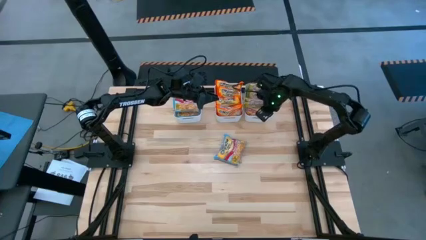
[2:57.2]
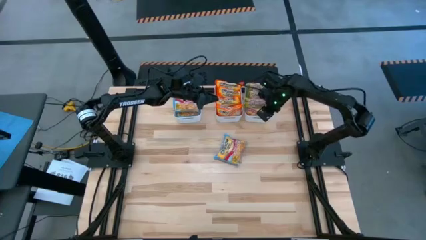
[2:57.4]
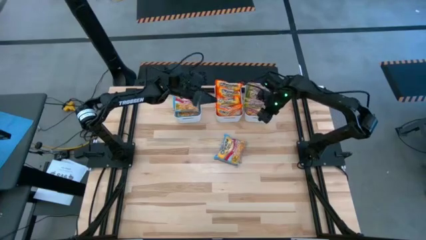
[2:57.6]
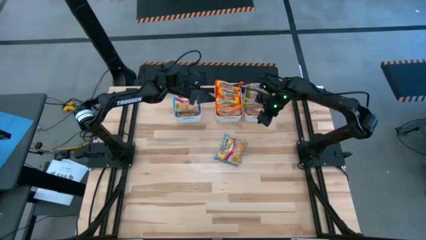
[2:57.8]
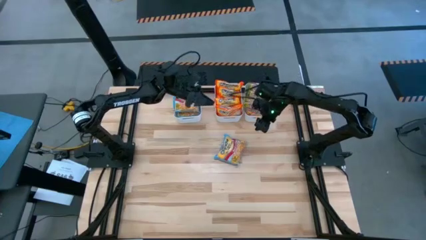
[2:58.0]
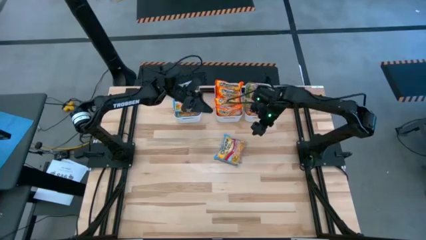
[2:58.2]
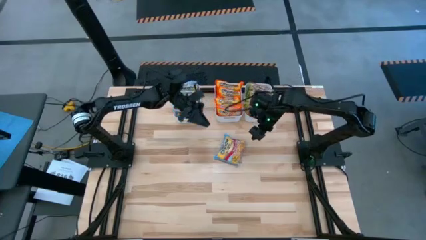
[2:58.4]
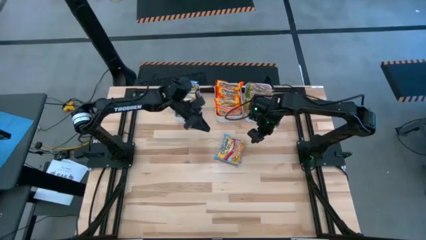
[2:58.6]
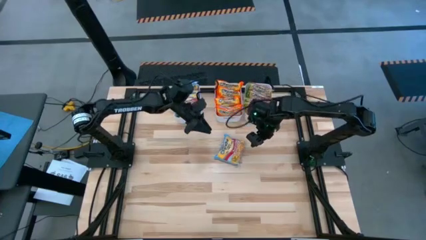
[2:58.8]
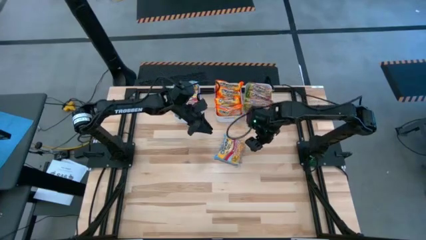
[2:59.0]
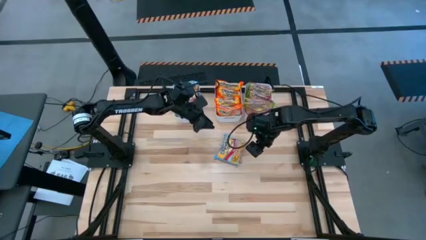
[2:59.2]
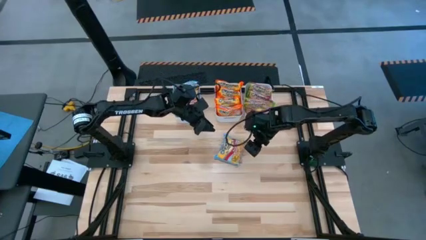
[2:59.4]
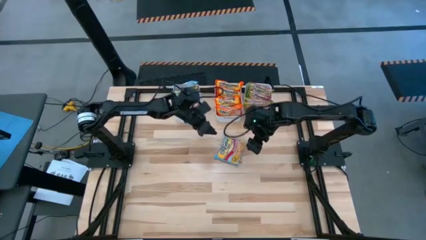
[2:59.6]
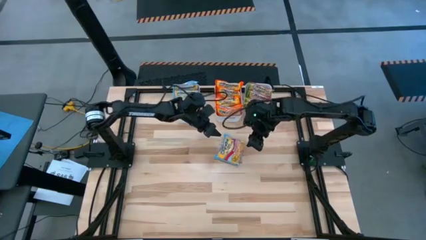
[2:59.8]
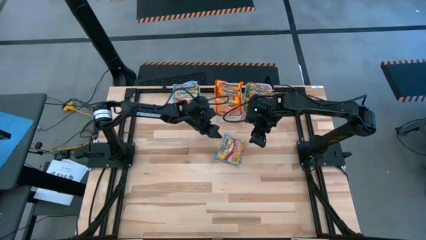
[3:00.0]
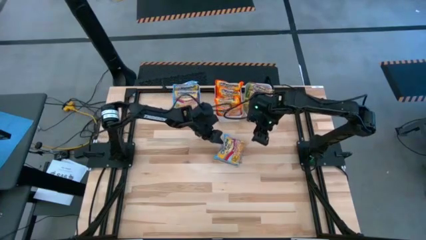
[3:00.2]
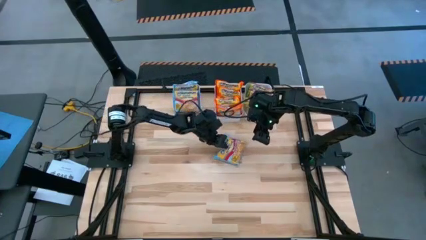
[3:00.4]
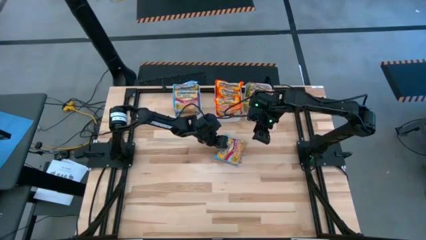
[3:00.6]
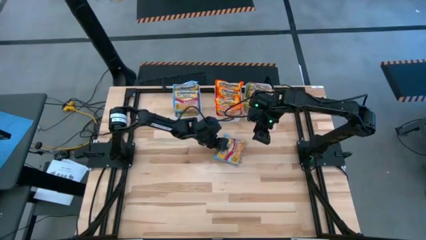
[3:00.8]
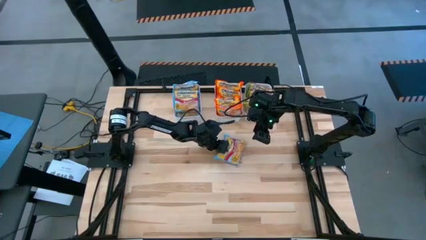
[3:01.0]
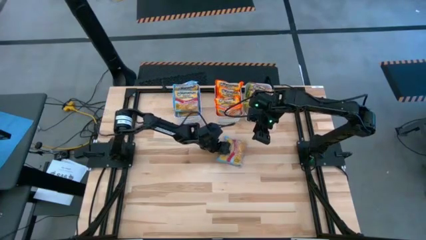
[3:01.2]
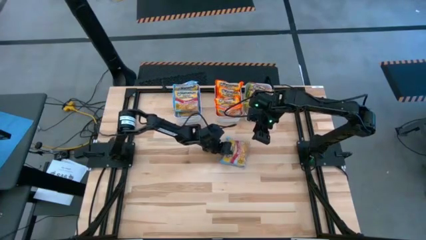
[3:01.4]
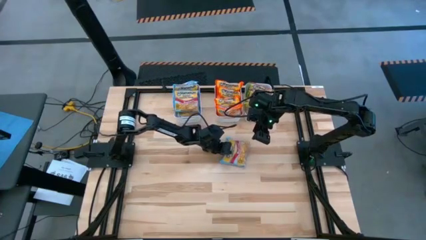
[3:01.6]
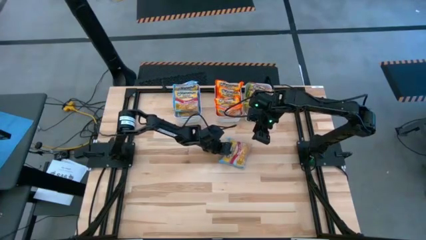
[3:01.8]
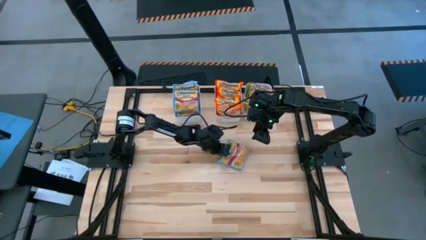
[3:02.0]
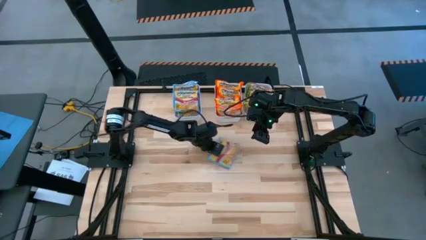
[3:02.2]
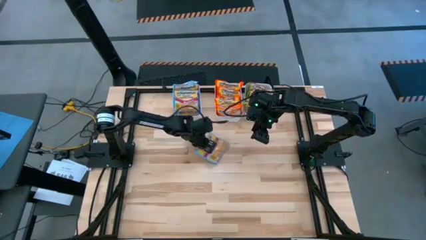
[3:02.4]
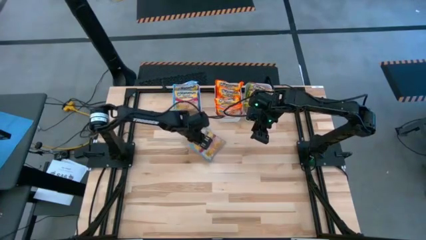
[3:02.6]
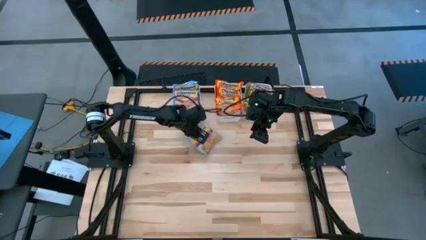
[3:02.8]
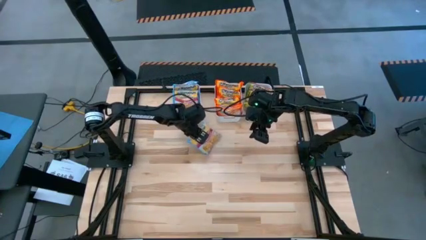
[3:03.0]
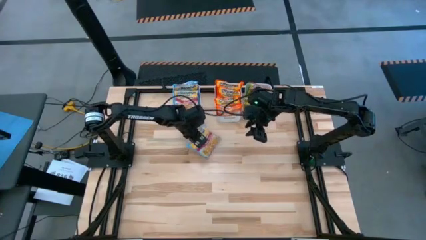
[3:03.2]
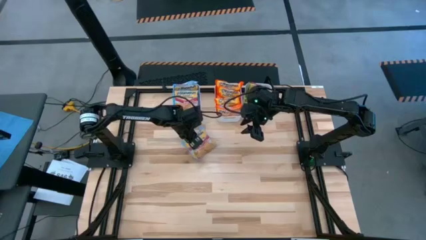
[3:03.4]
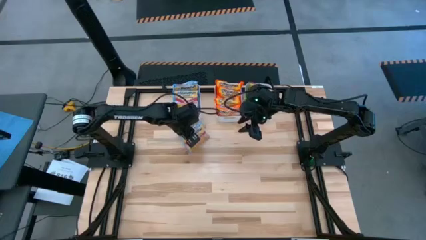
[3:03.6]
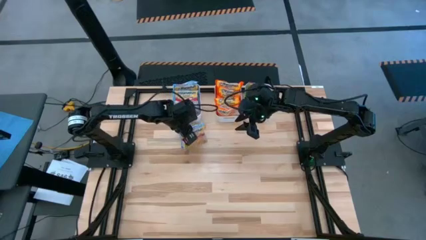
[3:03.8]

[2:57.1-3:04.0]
Task: Sort Maruchan noodles
Put the blue noodle pack into the left white bin

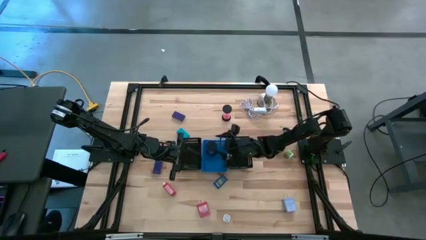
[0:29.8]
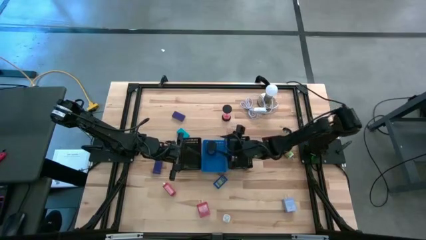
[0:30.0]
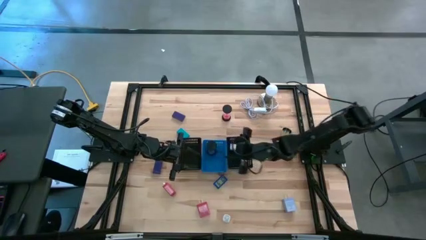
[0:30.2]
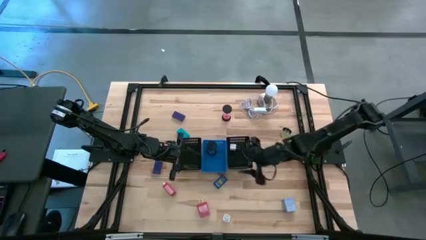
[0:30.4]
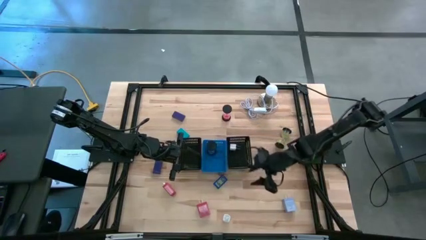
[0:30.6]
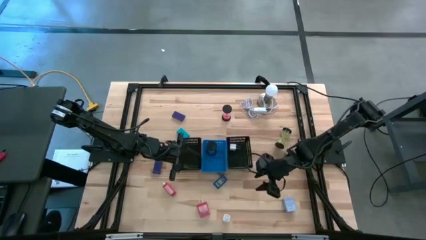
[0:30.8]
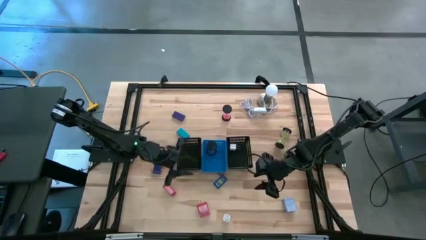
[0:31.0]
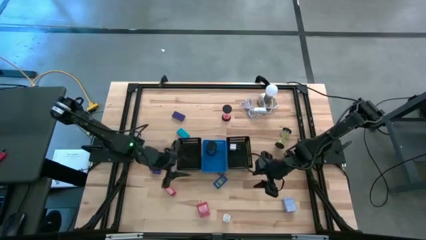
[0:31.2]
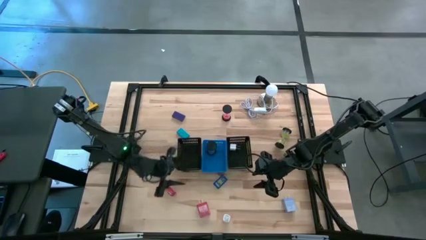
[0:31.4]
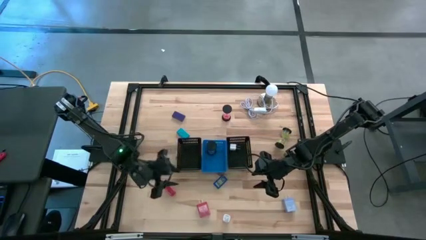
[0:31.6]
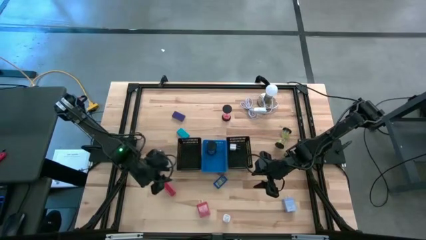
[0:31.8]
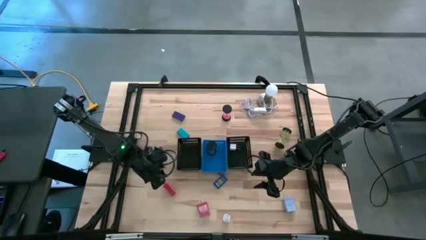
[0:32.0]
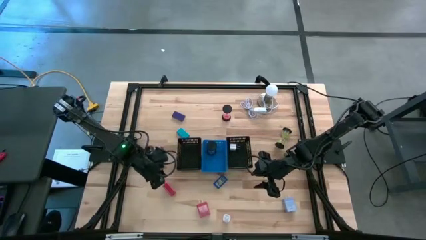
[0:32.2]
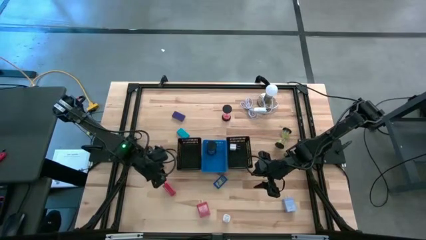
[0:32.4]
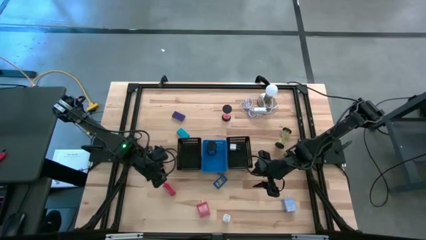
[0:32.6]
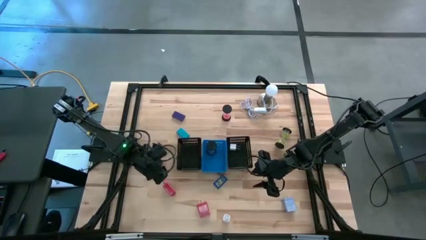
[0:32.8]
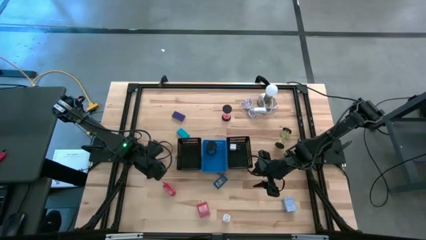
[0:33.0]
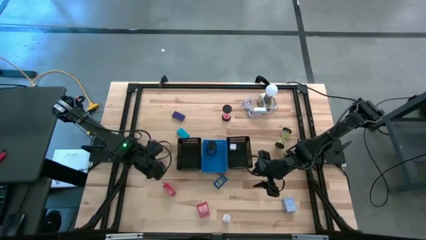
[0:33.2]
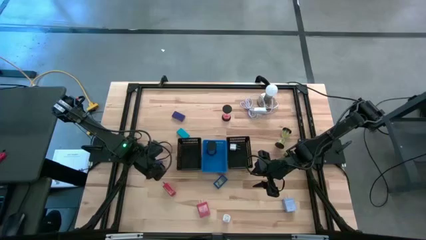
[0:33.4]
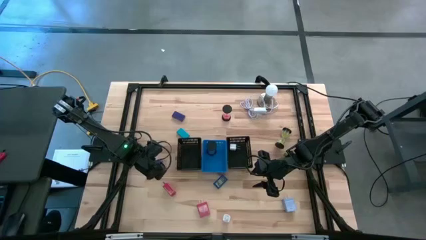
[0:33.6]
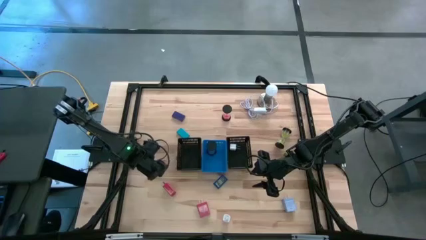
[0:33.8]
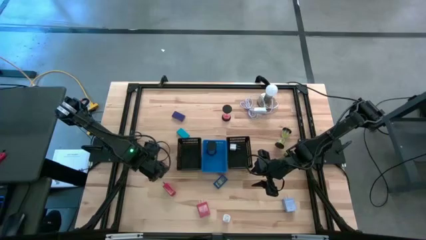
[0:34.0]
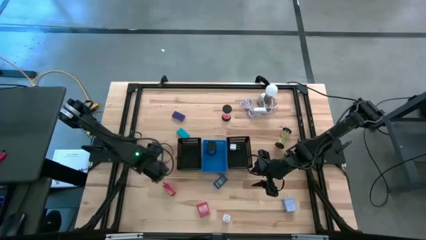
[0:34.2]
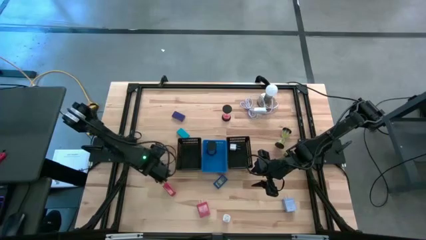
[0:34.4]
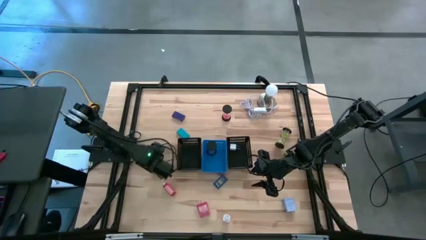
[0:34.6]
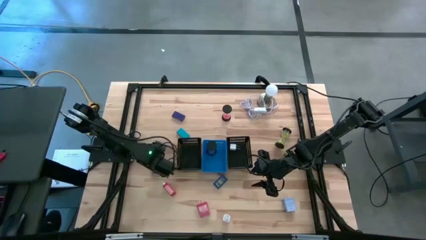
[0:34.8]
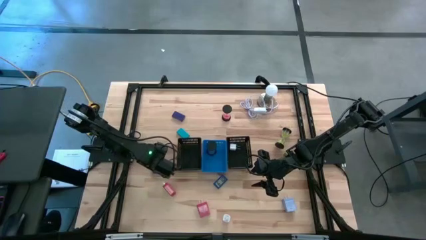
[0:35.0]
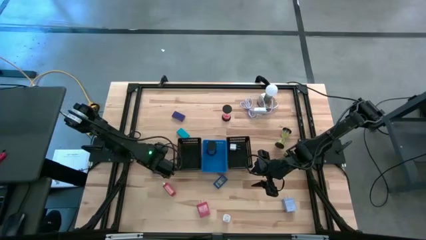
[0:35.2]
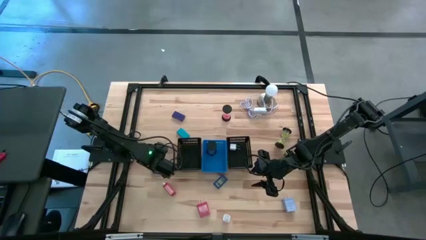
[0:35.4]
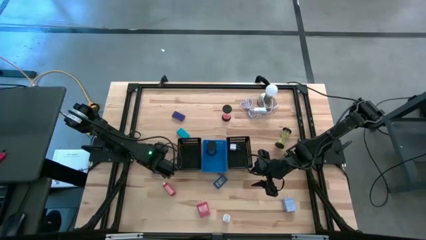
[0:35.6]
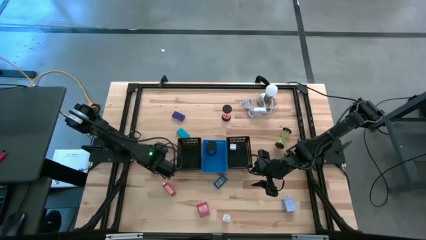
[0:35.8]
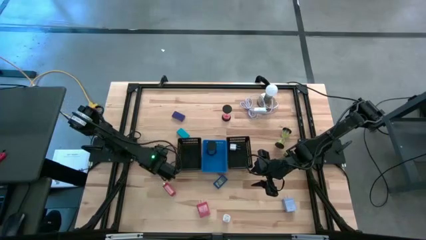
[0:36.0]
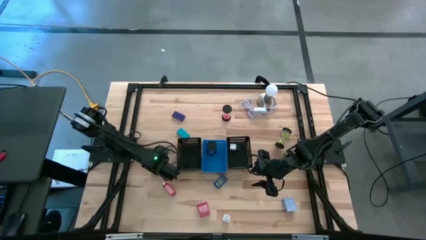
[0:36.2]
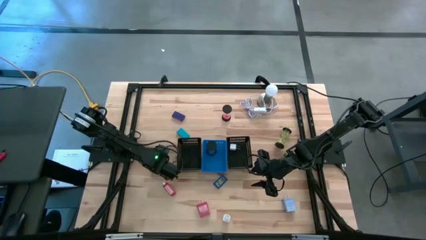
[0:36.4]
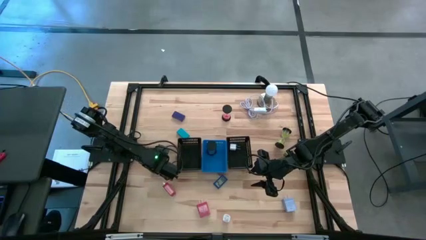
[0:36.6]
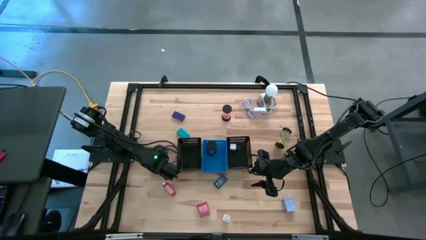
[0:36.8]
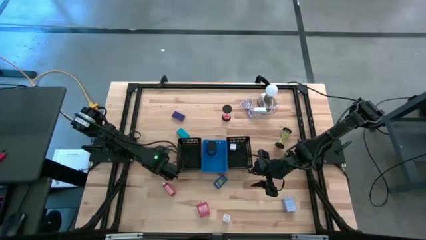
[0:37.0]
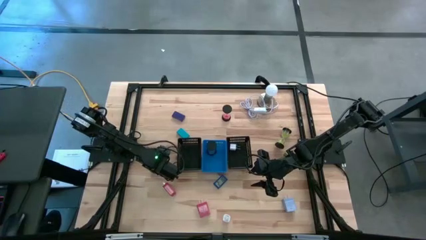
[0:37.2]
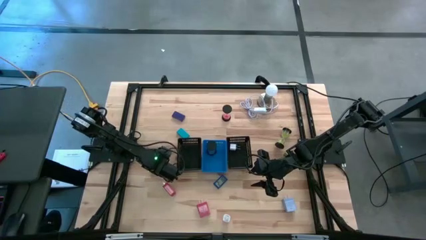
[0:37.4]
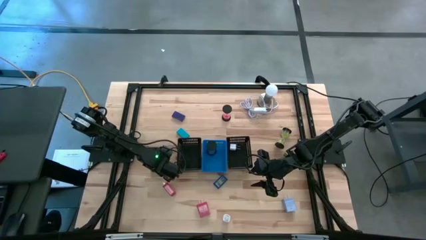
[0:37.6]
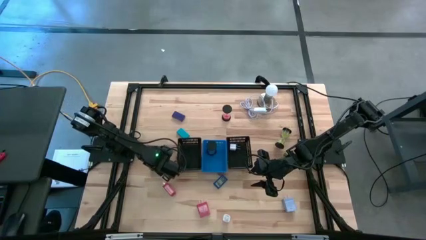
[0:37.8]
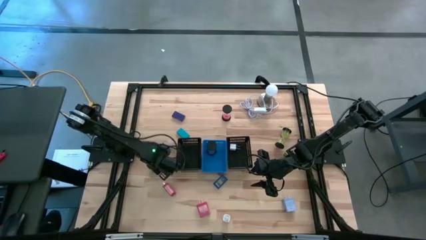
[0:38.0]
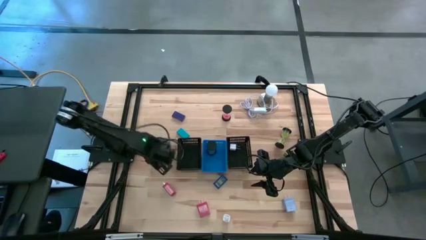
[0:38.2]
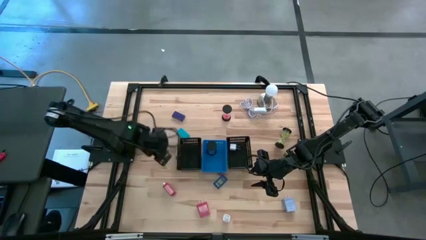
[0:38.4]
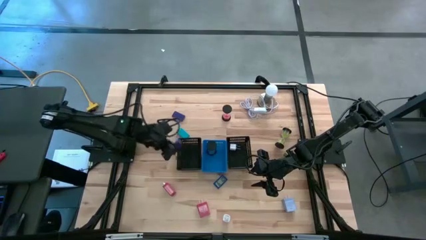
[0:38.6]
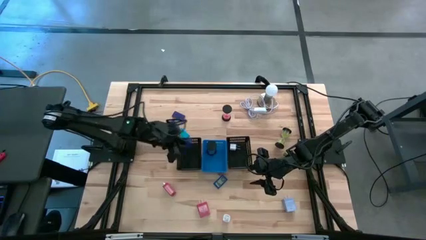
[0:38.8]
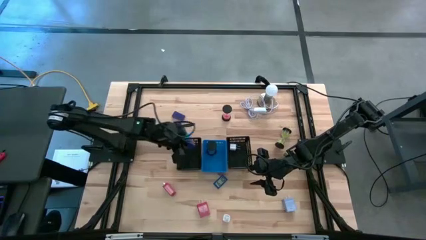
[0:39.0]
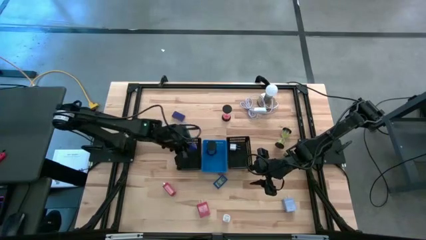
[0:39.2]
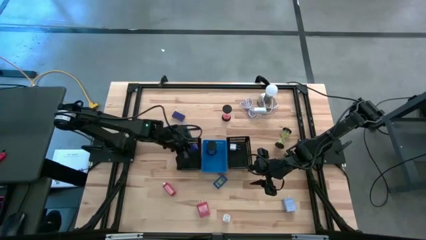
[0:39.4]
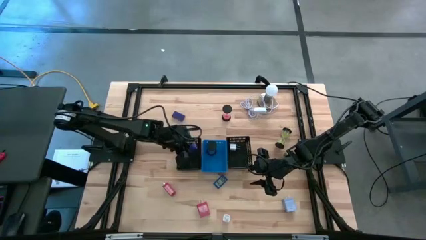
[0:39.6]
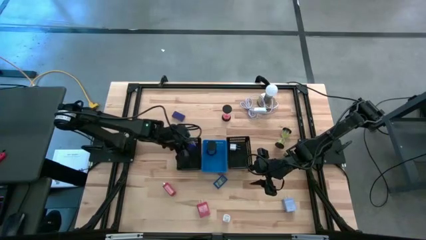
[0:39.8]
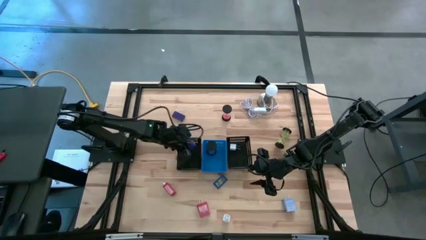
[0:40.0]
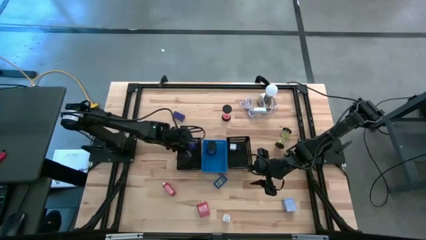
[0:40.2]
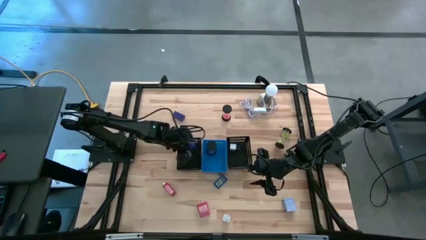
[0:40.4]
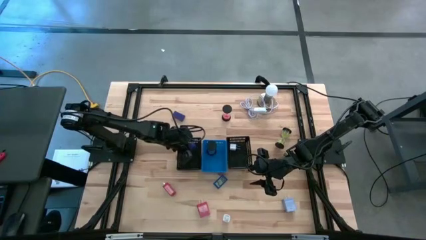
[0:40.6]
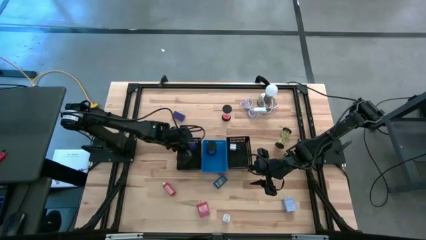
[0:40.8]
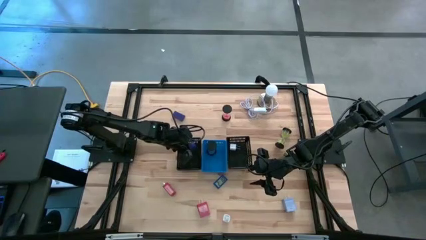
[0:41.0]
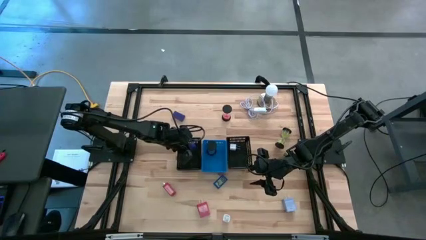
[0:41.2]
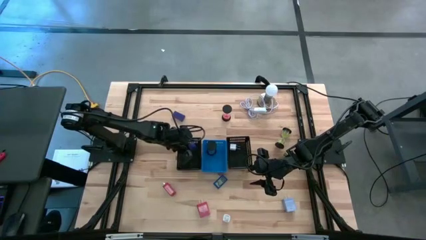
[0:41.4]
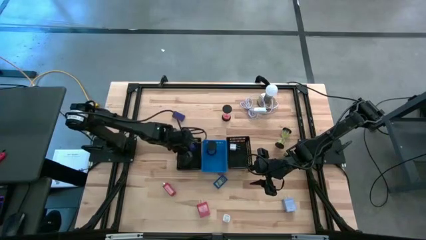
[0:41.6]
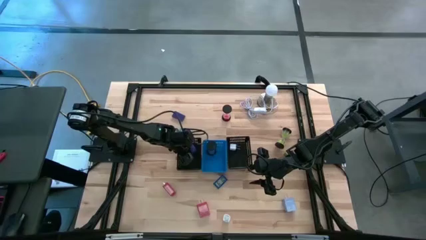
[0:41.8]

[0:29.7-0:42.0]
Task: Pick & Place Office items
Put the left violet digital clock into the left black bin
